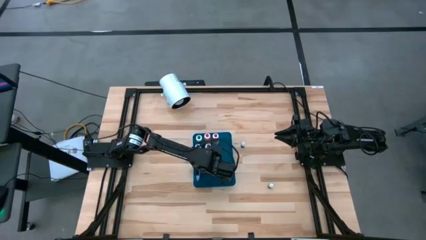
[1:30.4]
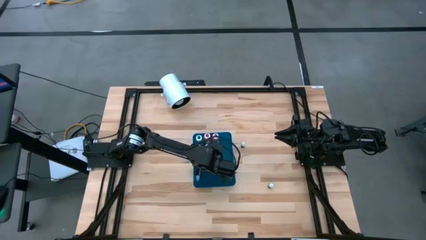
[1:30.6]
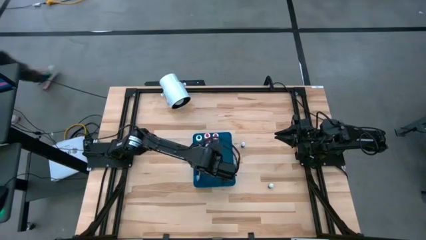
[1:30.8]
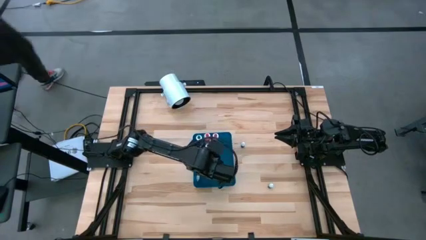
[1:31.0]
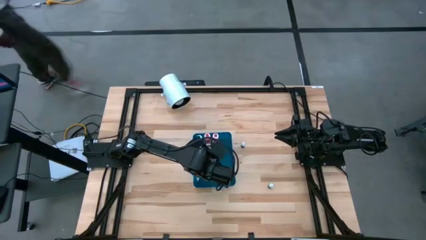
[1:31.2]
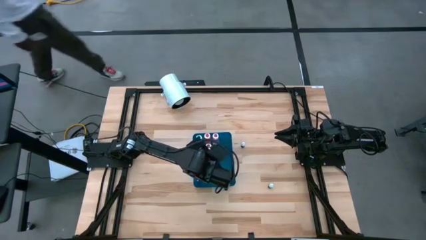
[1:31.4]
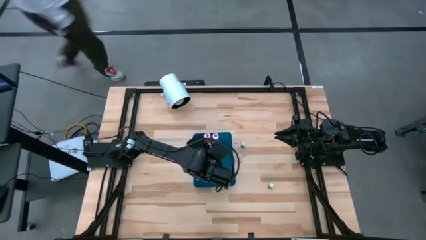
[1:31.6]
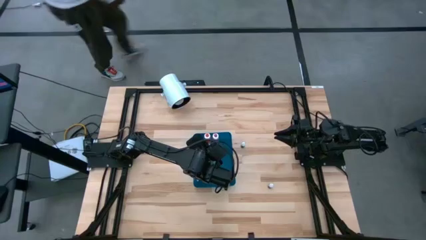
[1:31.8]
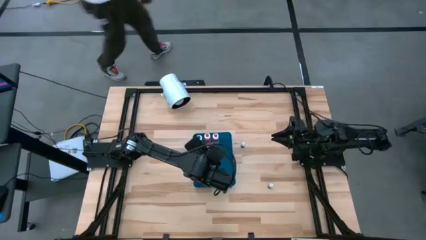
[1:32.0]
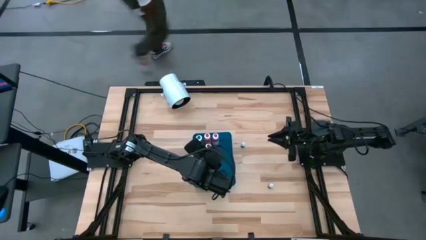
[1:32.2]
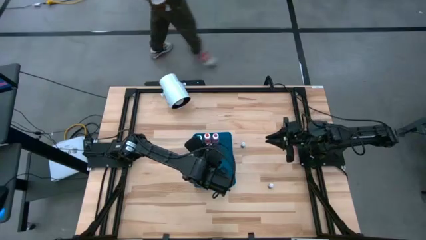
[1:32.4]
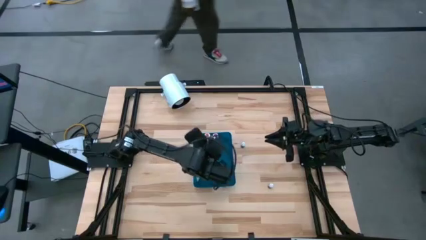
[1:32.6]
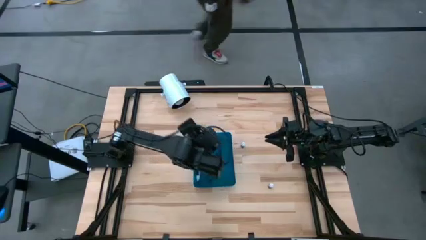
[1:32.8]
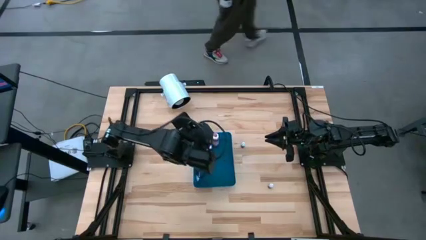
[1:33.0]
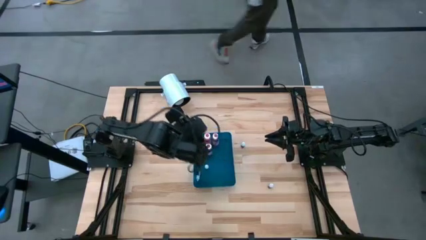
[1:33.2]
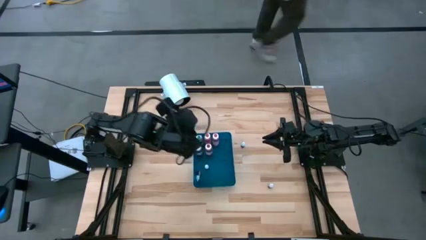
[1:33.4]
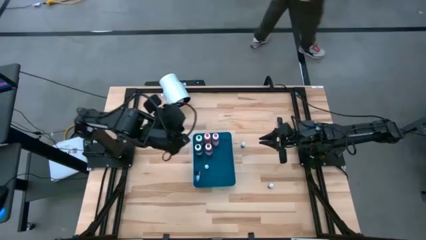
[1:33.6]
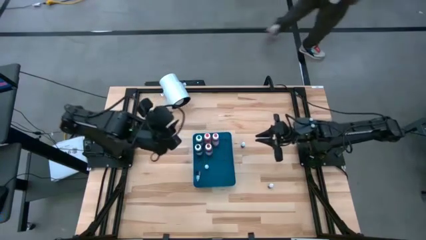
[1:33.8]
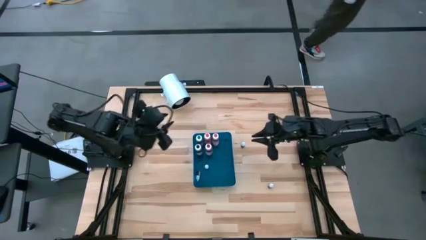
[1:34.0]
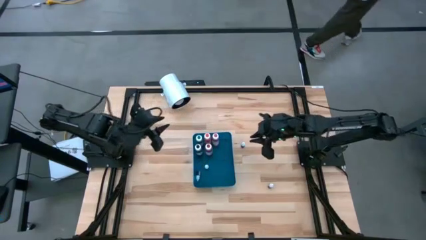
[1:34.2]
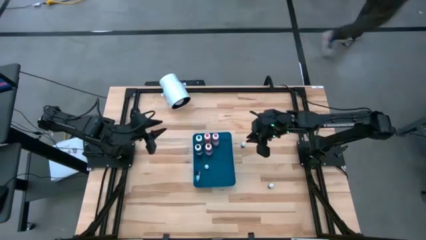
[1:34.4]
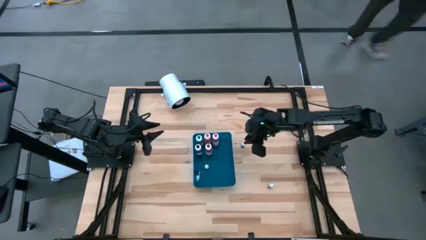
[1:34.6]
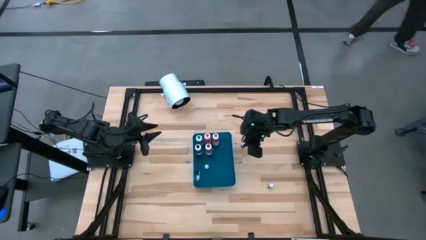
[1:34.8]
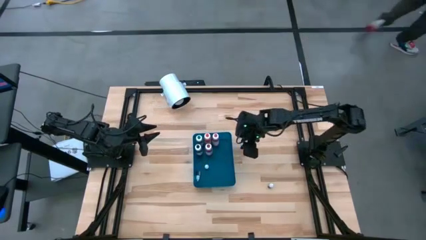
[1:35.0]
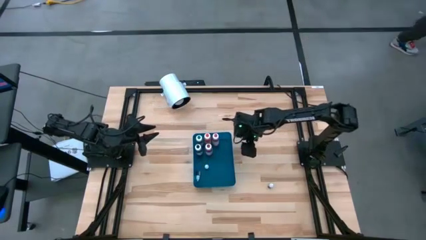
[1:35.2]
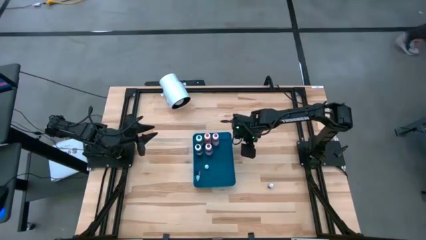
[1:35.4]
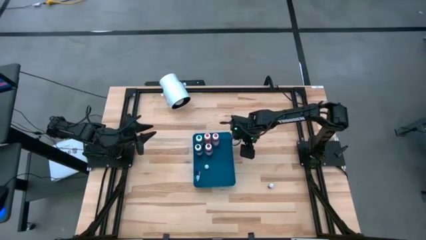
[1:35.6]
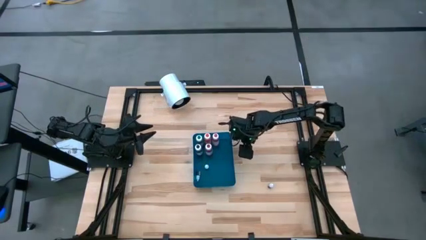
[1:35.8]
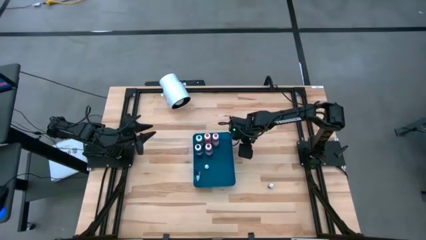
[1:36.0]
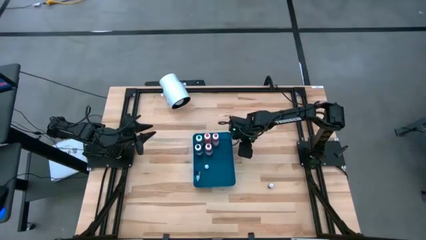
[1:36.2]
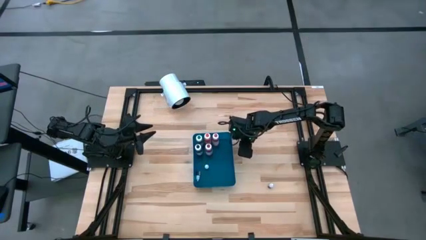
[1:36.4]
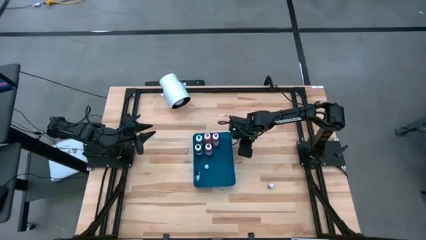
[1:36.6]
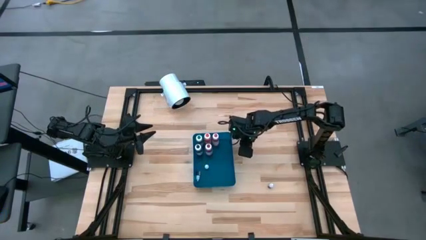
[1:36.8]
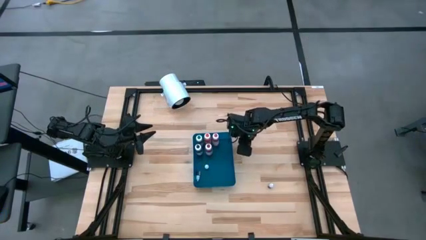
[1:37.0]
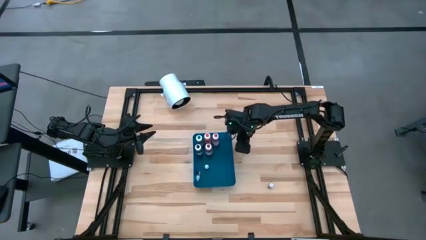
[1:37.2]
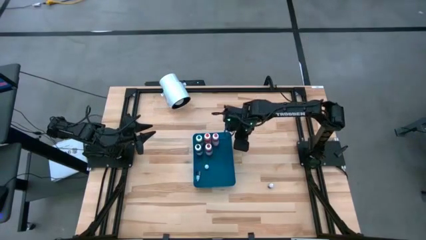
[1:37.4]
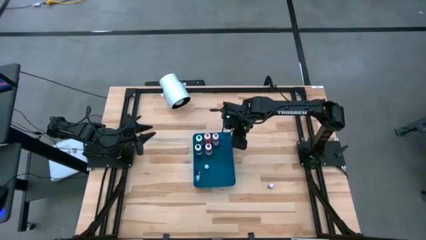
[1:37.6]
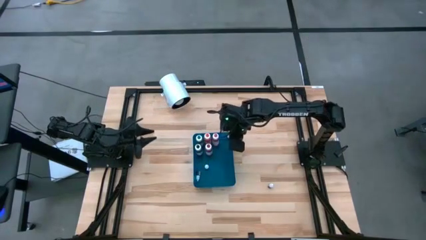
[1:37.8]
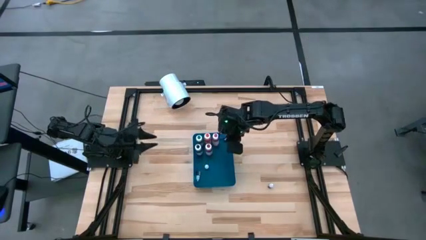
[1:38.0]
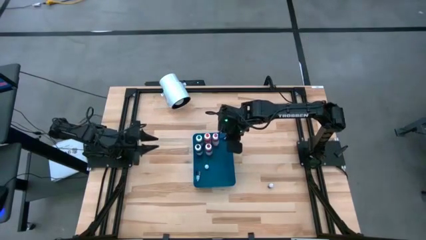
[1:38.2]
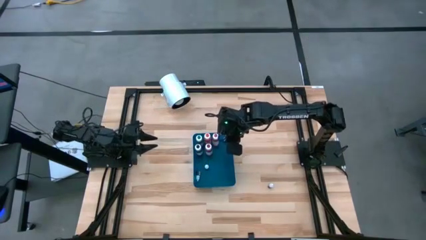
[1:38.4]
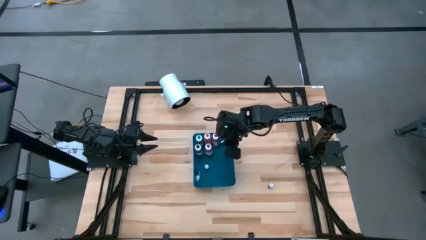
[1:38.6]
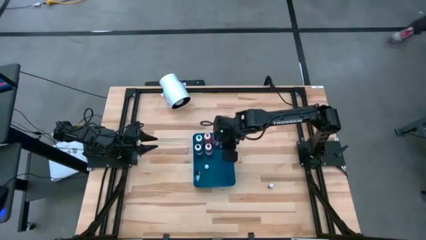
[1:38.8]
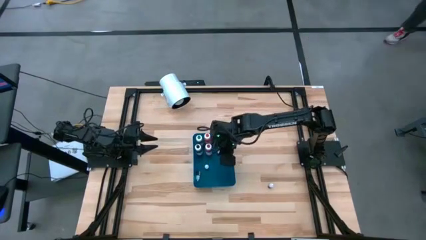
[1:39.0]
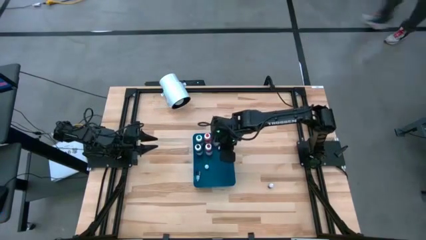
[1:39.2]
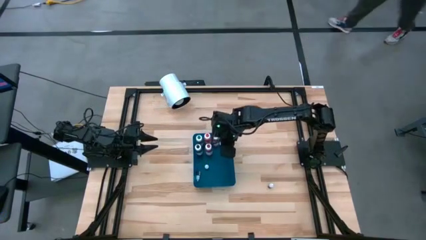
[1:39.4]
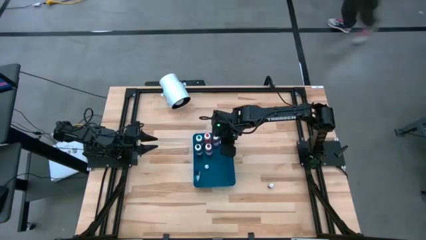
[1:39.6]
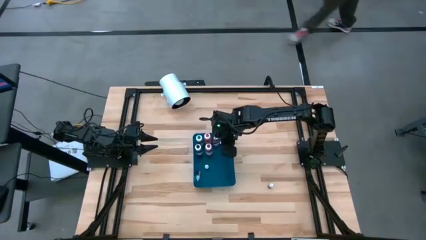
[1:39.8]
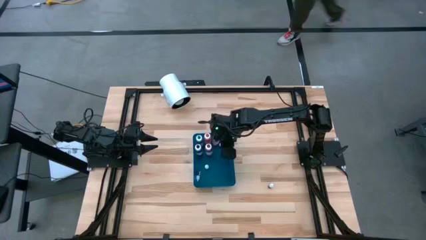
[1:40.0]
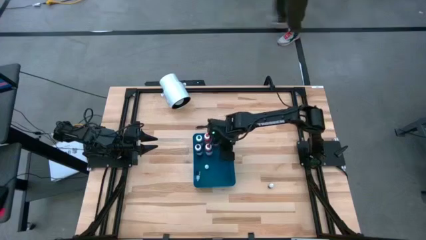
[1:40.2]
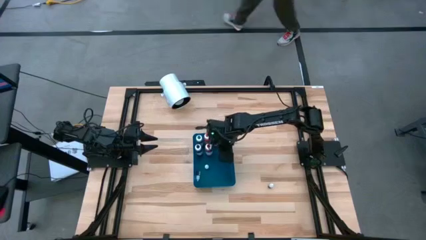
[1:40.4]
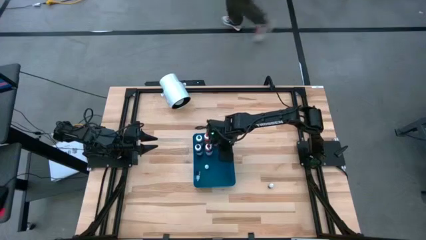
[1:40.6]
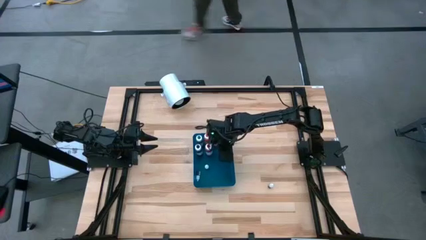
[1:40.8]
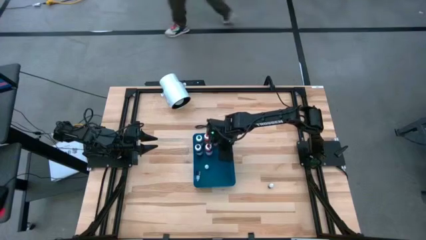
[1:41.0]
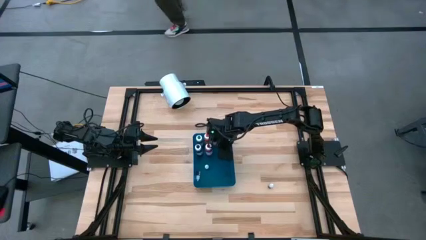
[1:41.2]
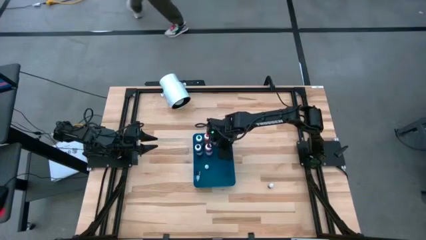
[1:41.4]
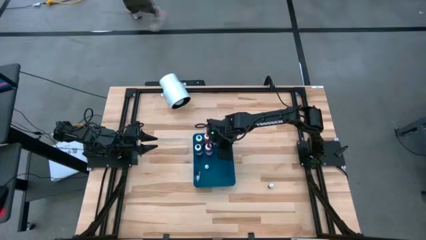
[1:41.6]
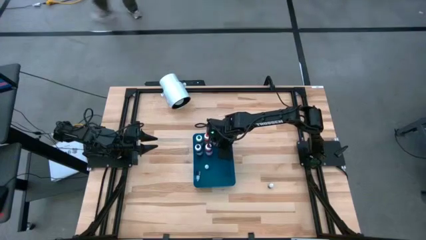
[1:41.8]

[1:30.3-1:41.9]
Task: Pick & Place food coloring
Put the left small black food coloring bottle into the blue bin

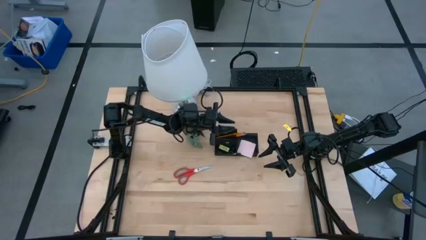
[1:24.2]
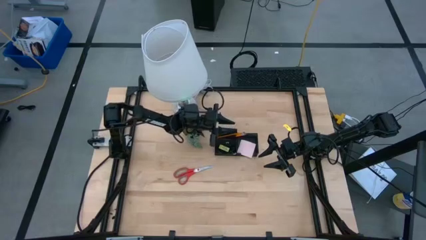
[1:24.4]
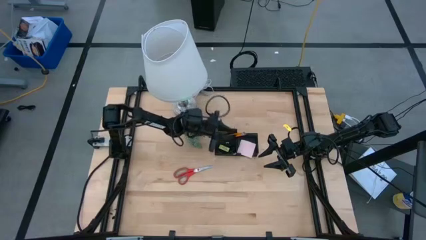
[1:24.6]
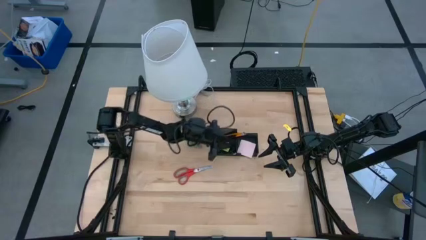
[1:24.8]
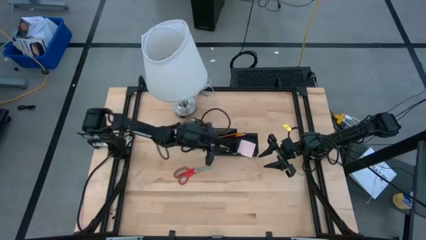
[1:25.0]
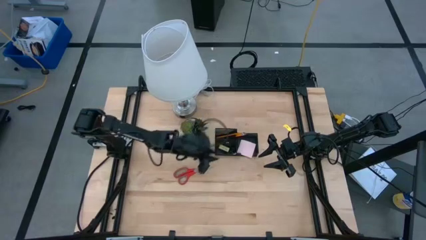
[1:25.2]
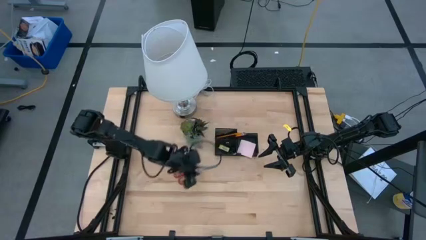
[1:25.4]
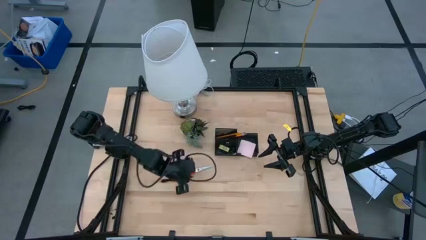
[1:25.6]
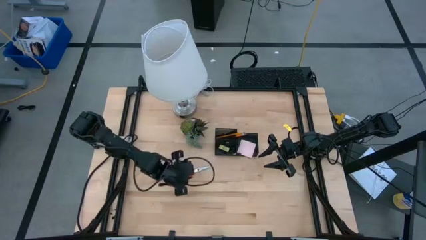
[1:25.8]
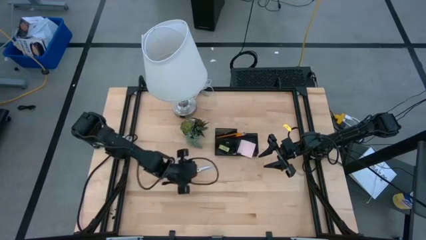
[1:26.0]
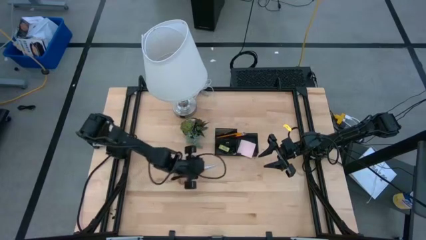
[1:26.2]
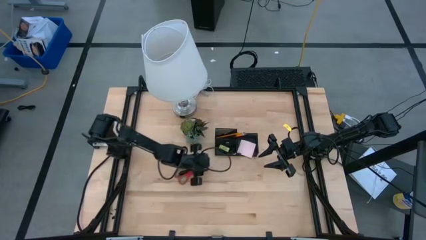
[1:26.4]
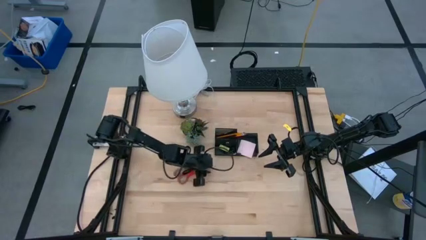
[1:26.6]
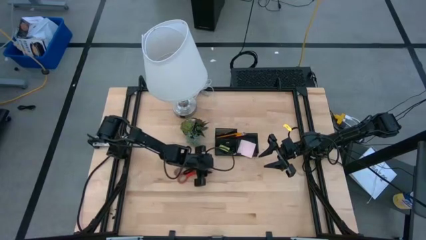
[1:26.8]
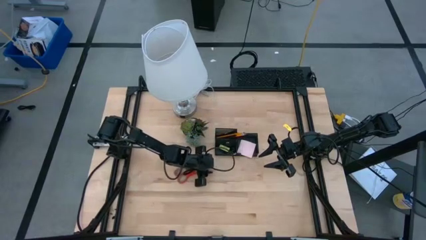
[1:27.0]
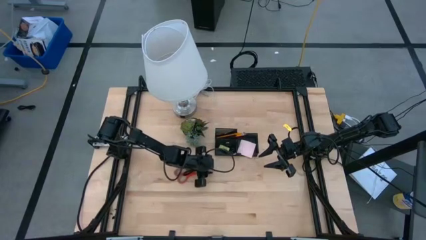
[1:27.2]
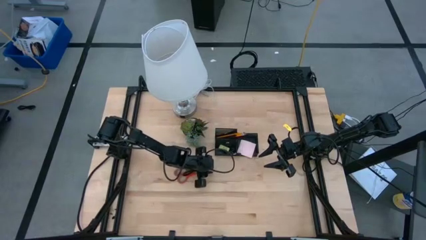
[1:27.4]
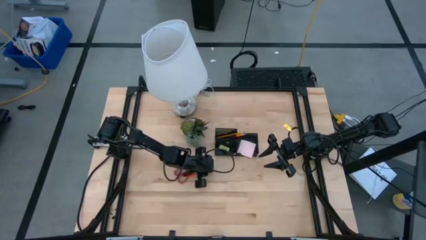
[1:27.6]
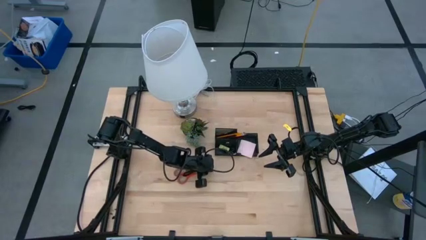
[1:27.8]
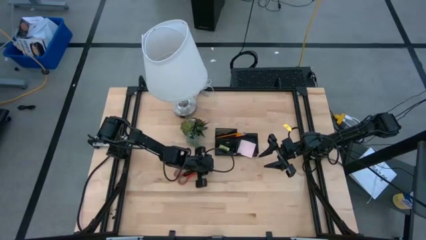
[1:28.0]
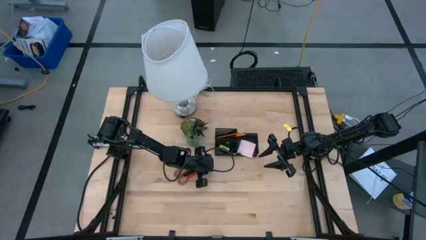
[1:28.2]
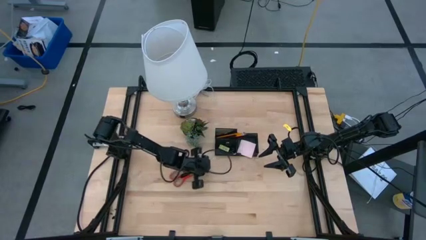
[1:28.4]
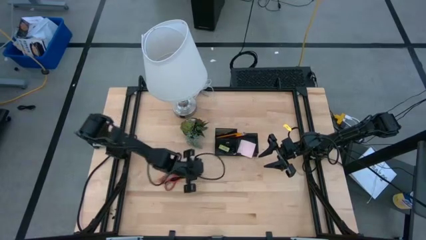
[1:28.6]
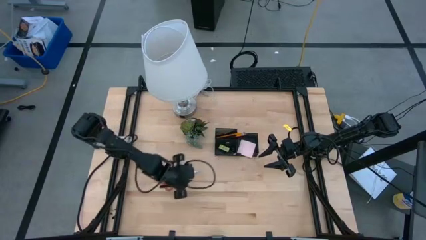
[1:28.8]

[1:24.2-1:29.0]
Task: Pick and place office supplies into organizer
Put the red scissors into the desk organizer
